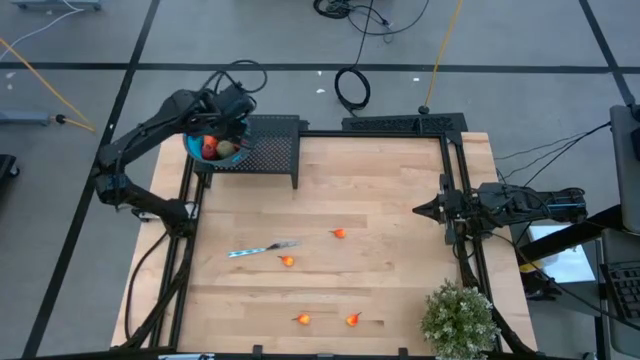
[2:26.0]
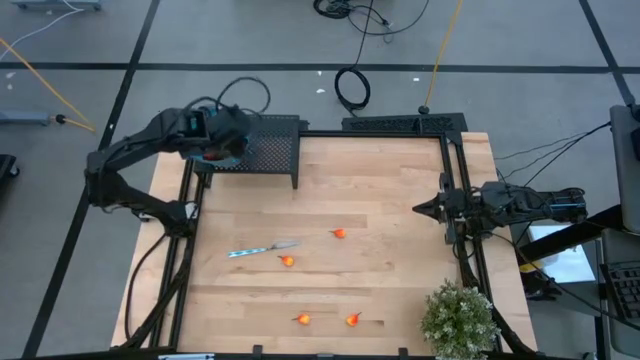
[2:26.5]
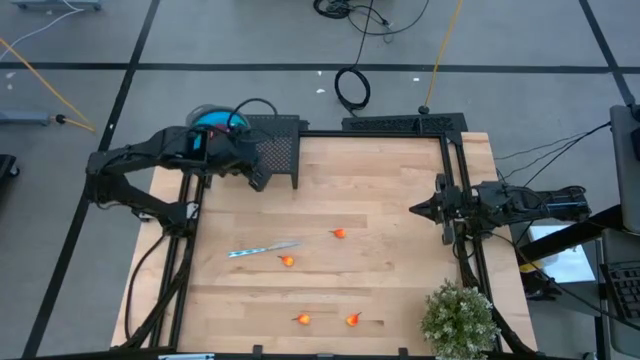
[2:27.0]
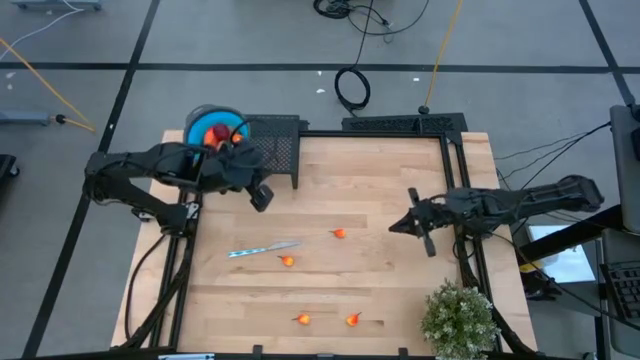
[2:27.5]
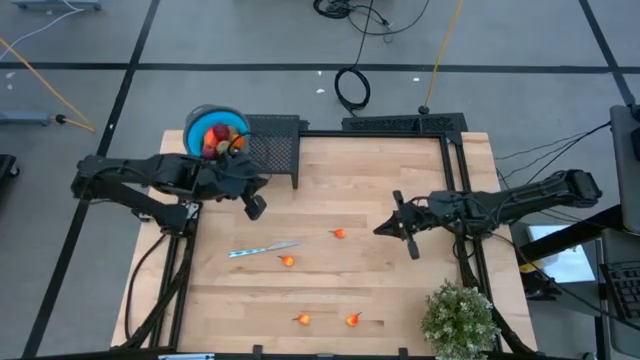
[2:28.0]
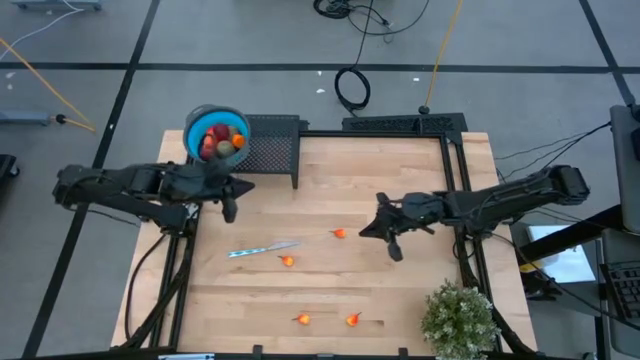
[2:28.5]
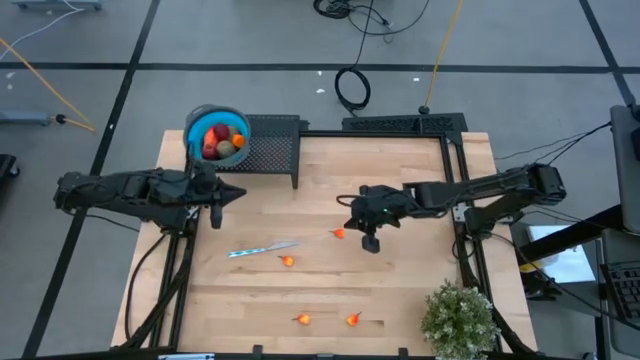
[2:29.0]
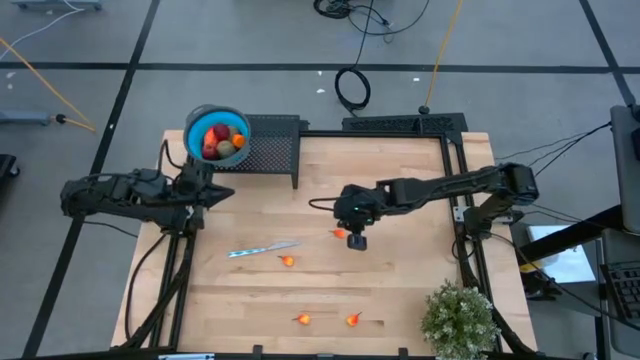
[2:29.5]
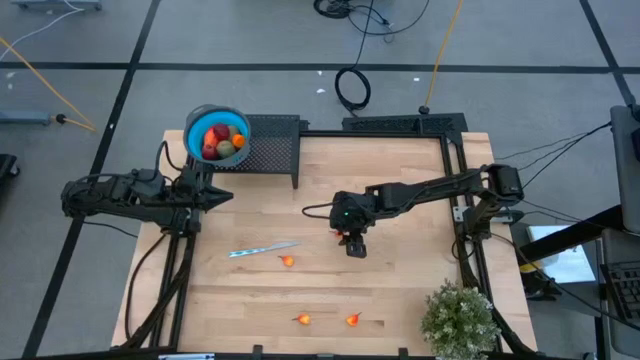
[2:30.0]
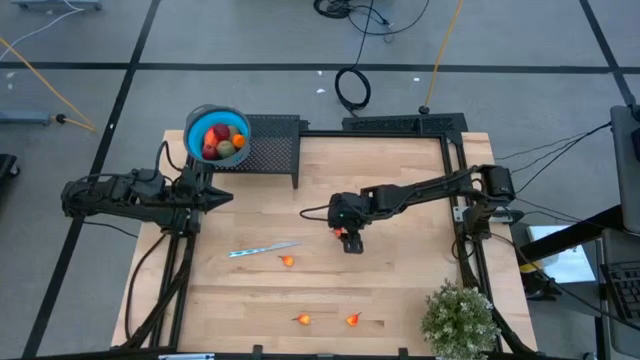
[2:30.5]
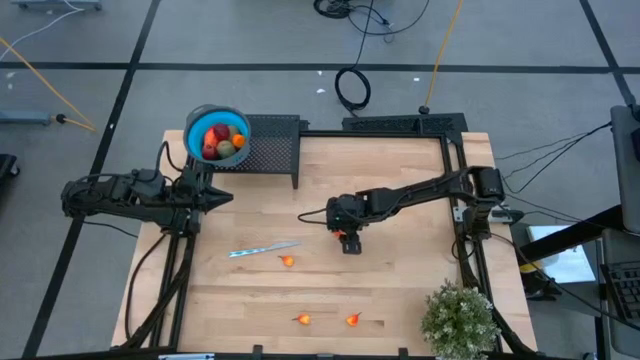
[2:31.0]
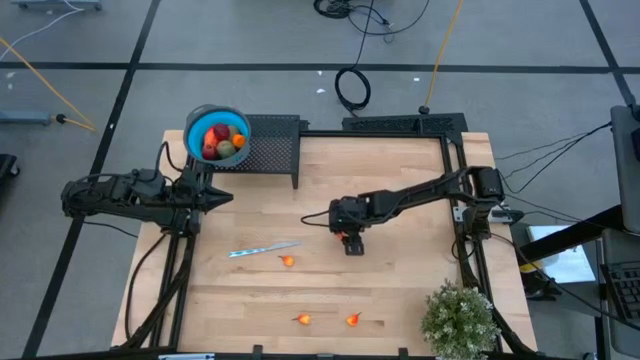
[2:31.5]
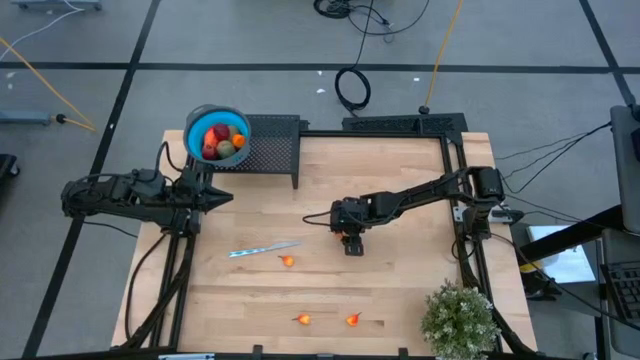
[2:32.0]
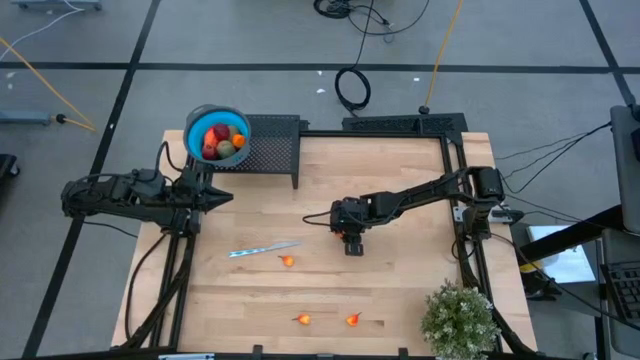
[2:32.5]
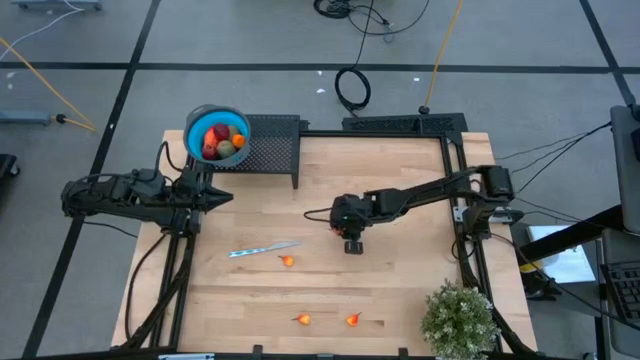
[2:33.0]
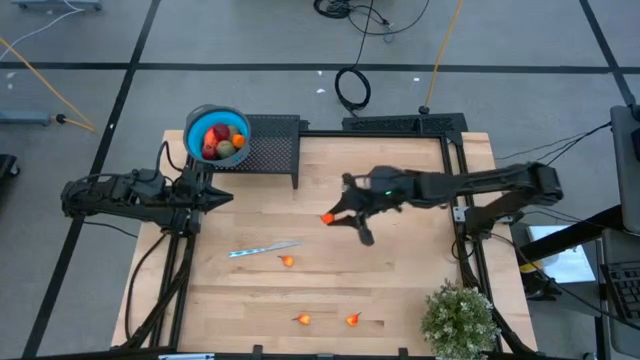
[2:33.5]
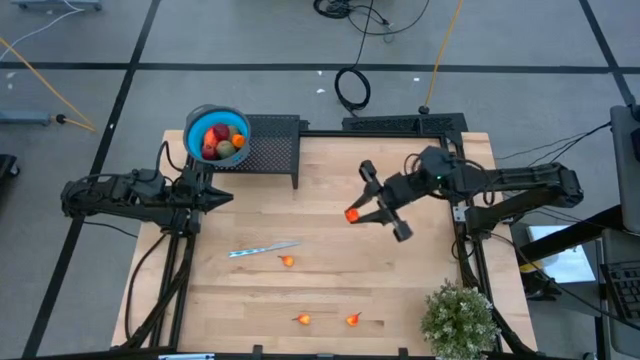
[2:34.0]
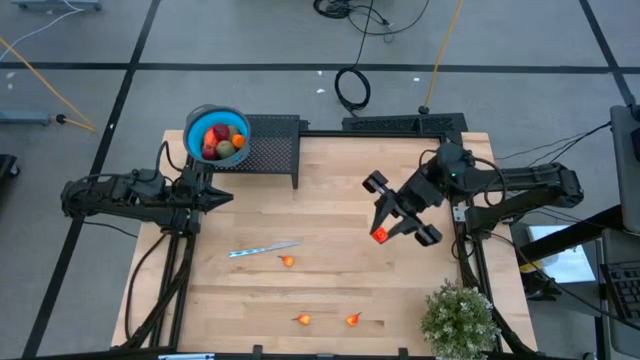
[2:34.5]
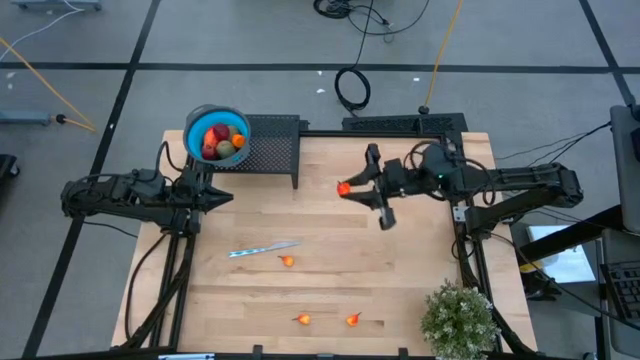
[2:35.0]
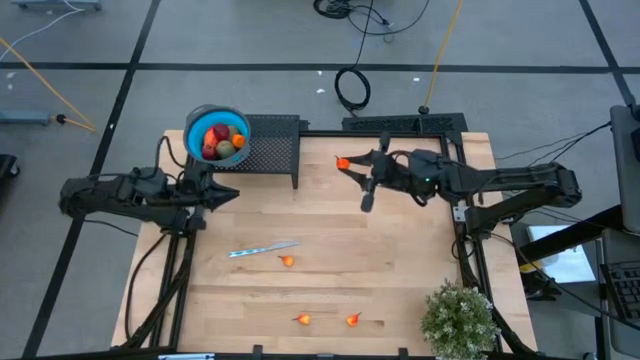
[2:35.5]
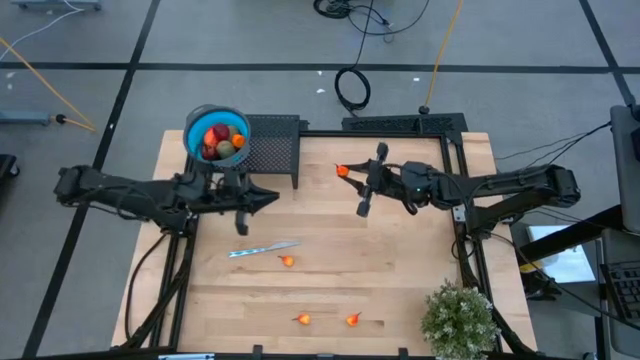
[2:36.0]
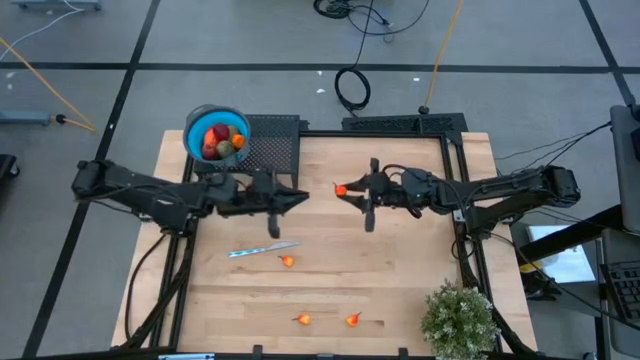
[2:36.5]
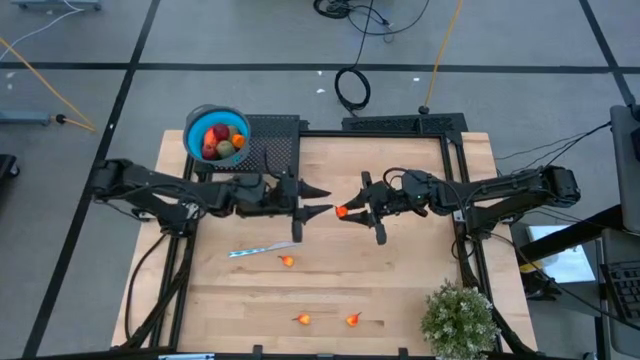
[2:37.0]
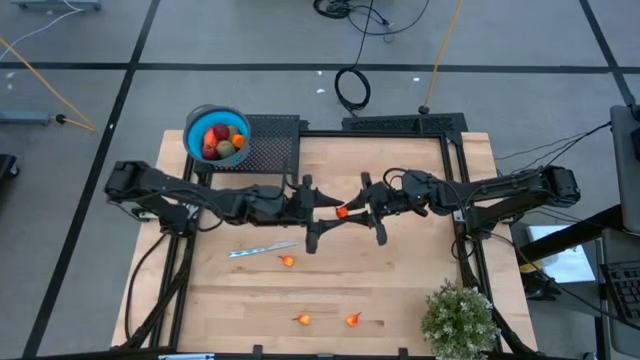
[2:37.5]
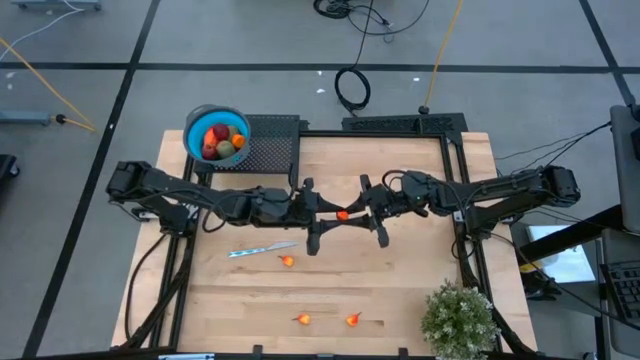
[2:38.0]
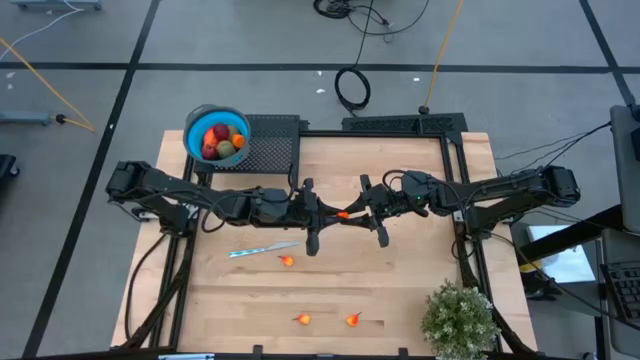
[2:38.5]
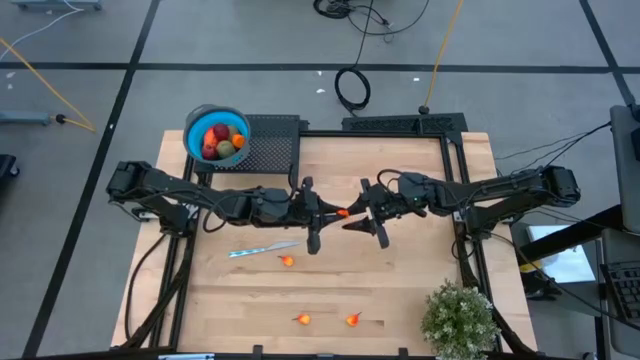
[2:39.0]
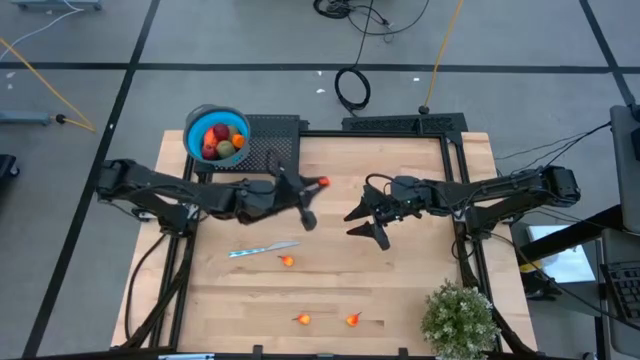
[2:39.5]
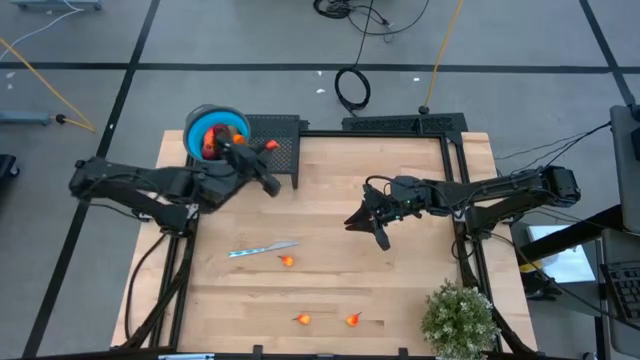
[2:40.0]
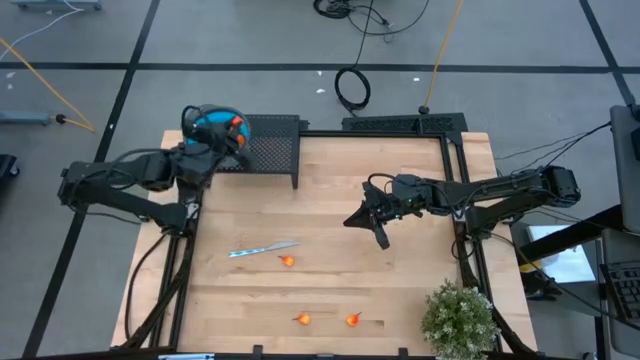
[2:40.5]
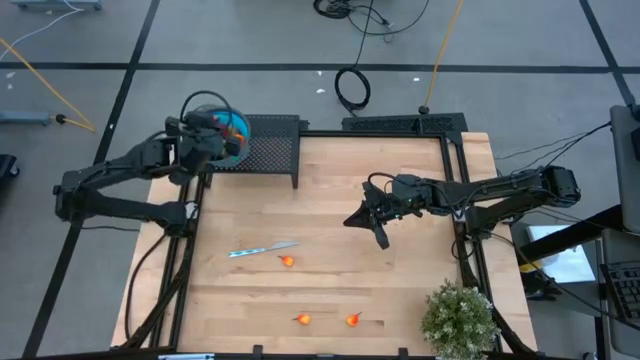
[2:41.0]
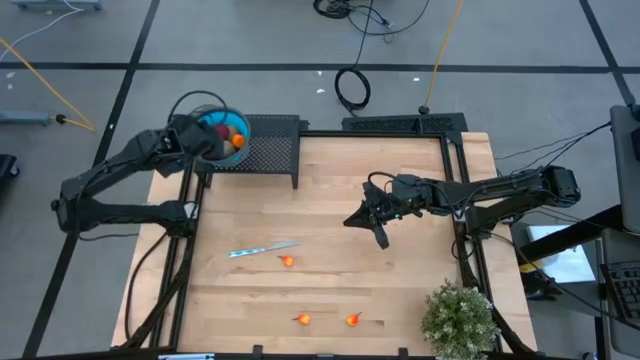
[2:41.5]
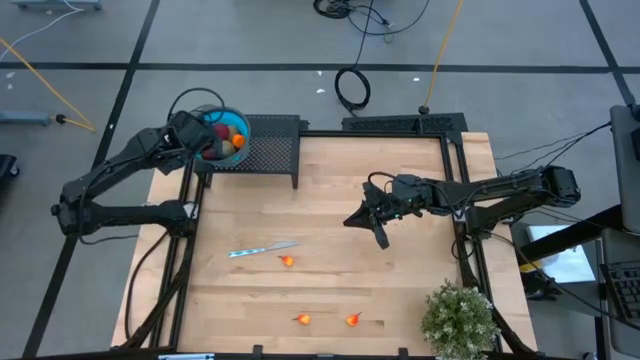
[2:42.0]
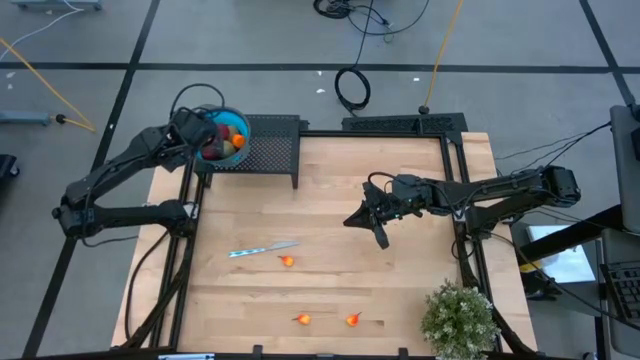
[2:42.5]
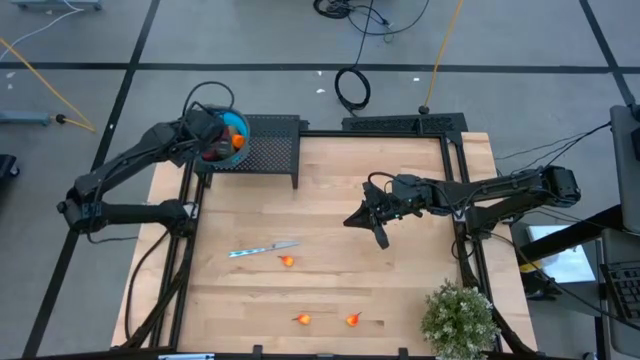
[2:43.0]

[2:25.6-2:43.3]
Task: Pick & Place Fruit
Put the peach into the blue strainer bowl on the shelf

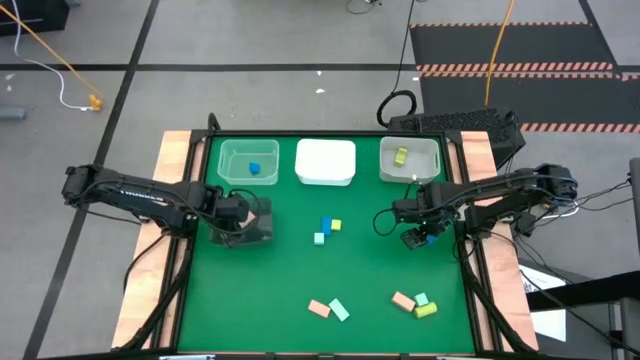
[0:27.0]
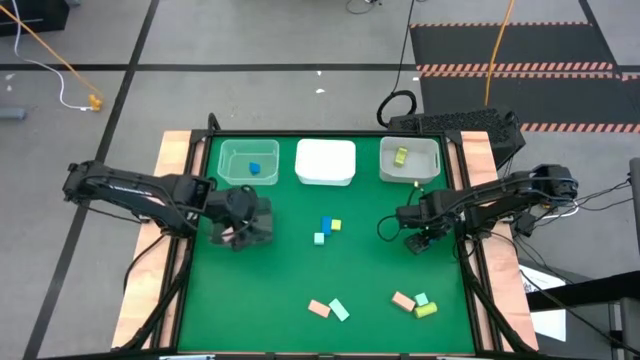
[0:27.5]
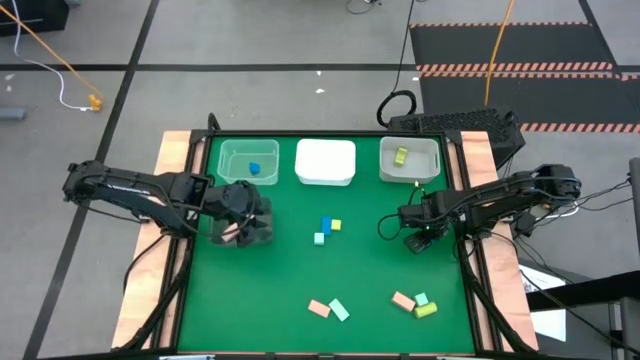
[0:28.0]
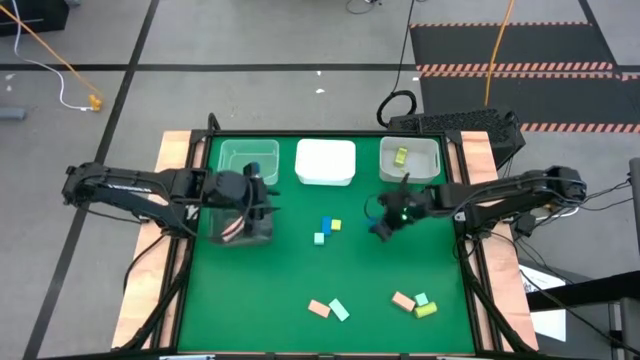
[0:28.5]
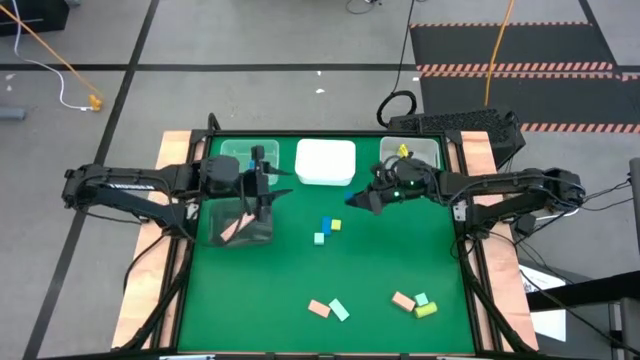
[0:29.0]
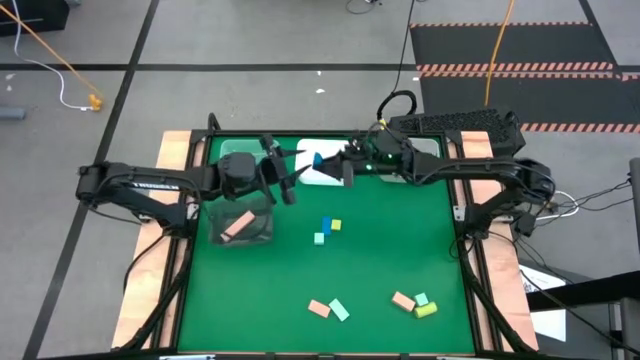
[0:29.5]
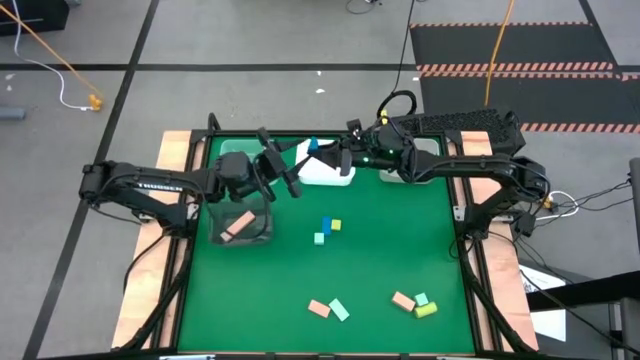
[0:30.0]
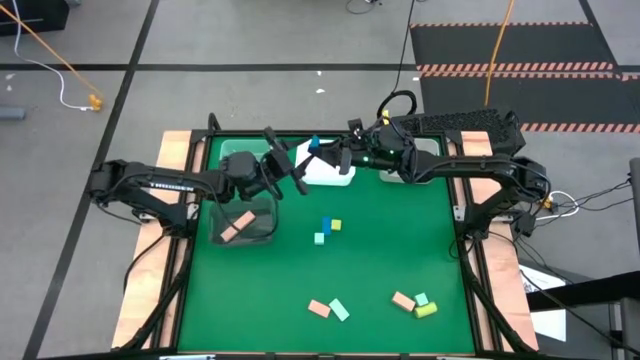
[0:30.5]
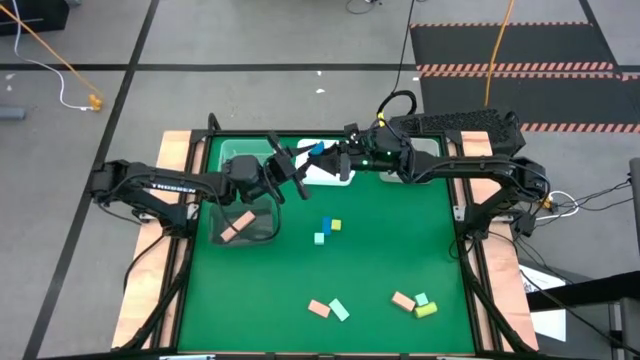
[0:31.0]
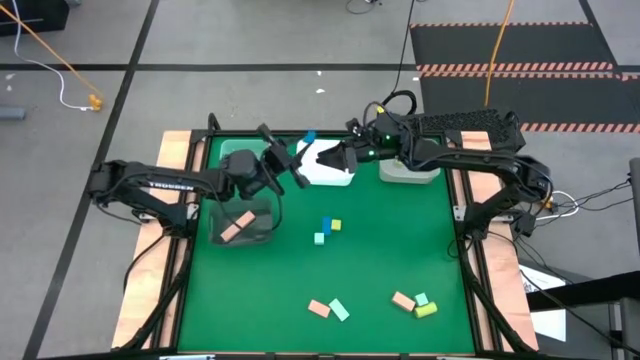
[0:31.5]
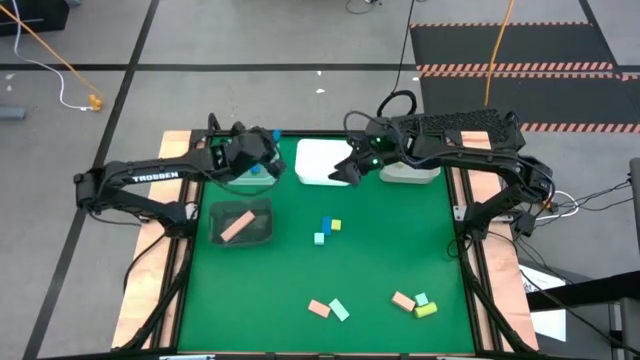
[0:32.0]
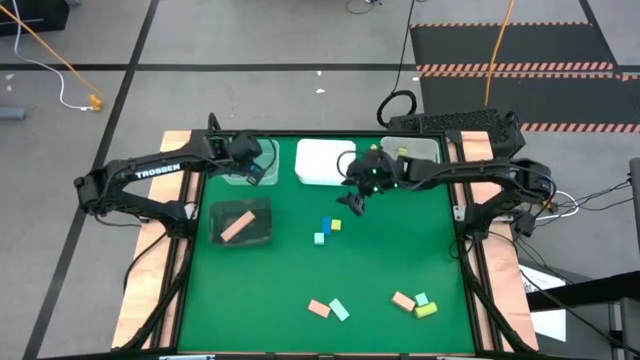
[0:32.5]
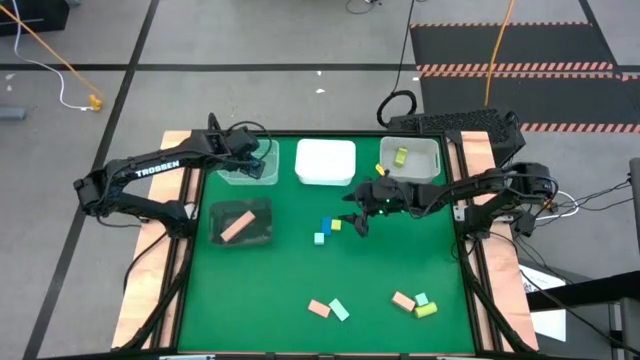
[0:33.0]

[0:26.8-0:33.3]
Task: Sort & place blocks by color
Put the blue block into the transparent bin
